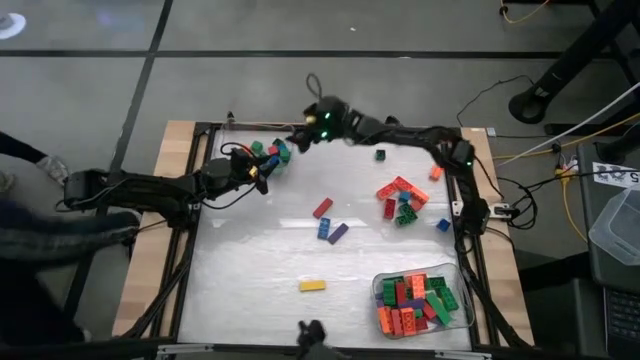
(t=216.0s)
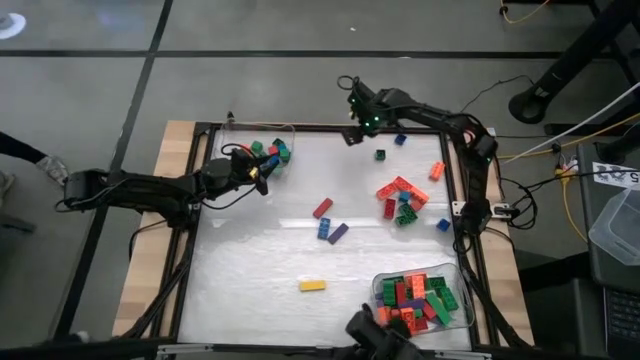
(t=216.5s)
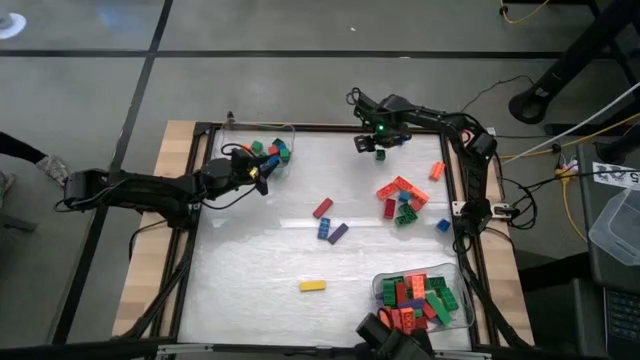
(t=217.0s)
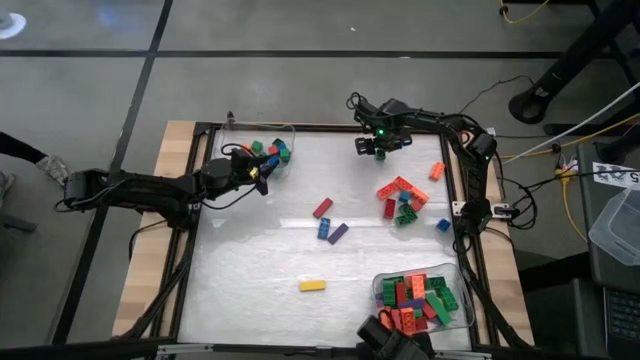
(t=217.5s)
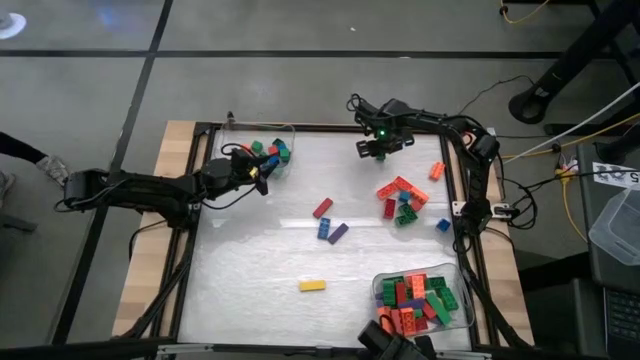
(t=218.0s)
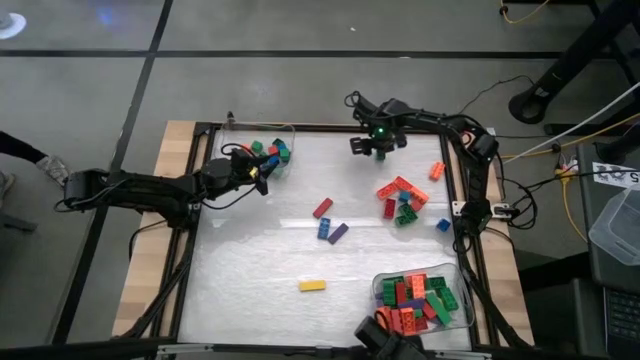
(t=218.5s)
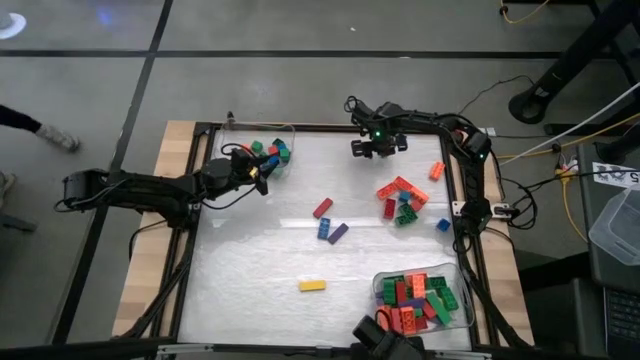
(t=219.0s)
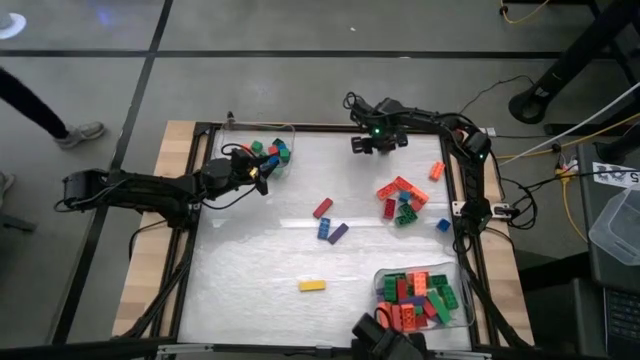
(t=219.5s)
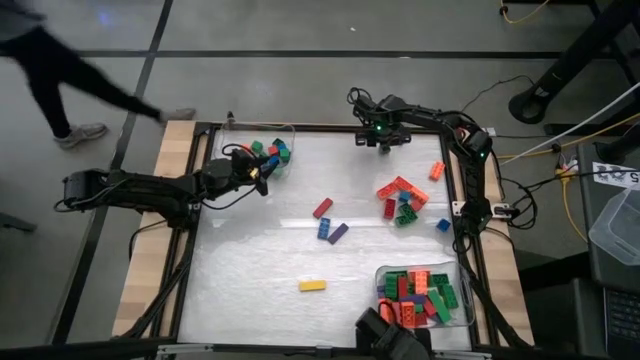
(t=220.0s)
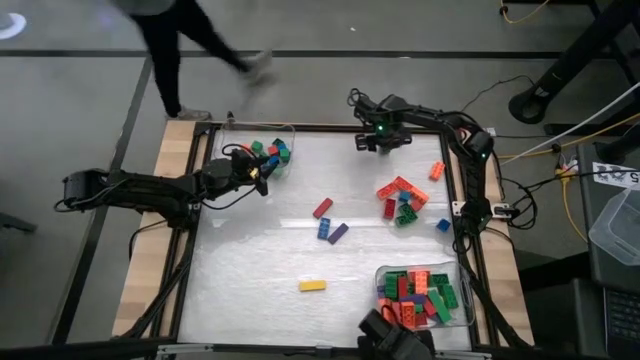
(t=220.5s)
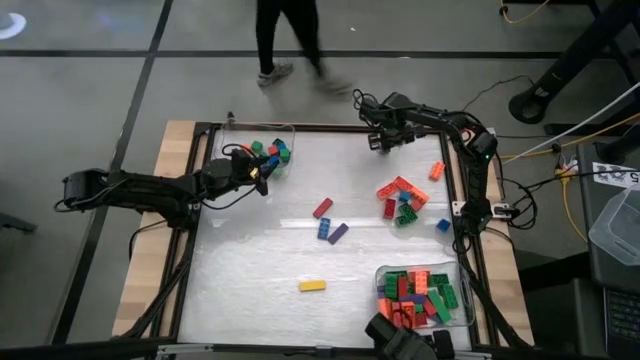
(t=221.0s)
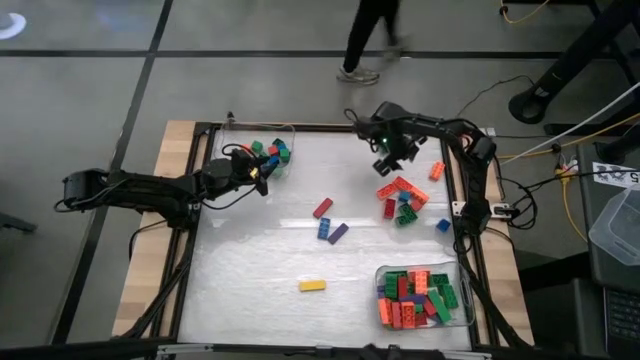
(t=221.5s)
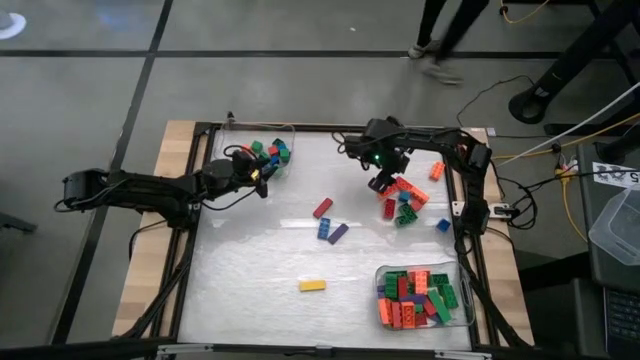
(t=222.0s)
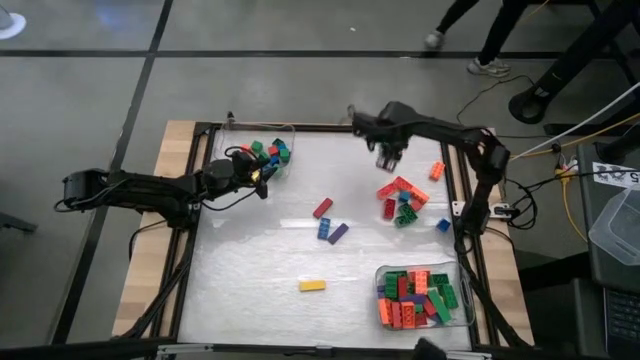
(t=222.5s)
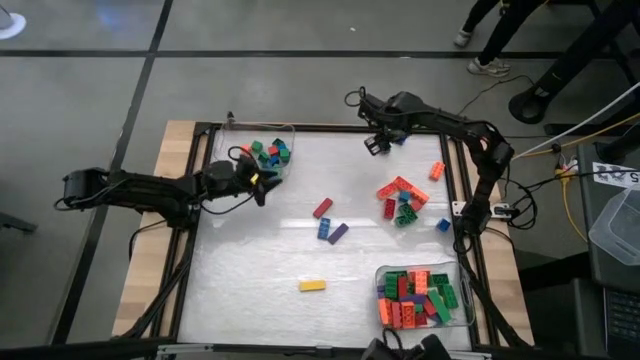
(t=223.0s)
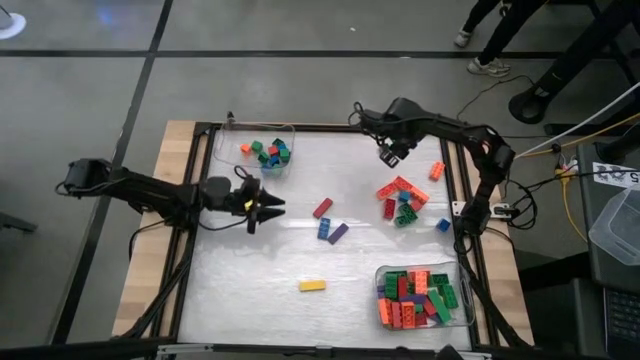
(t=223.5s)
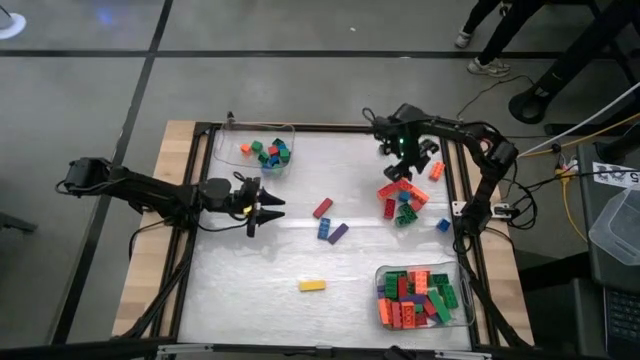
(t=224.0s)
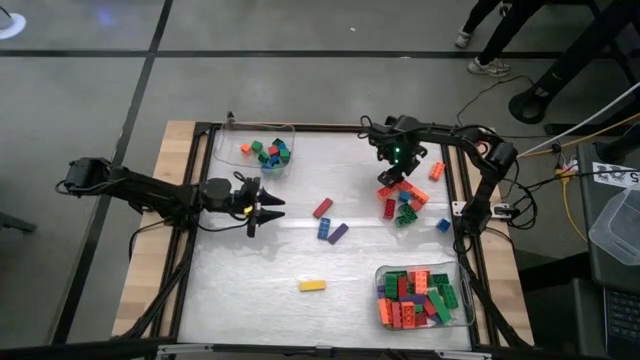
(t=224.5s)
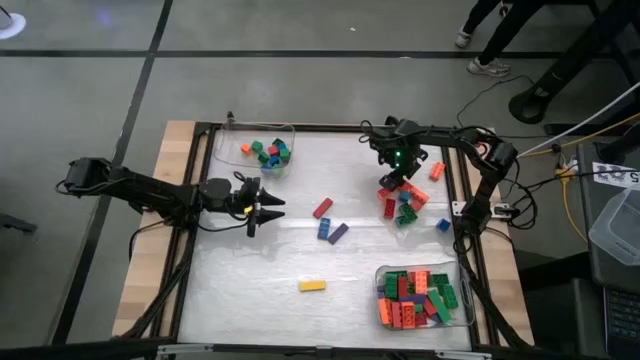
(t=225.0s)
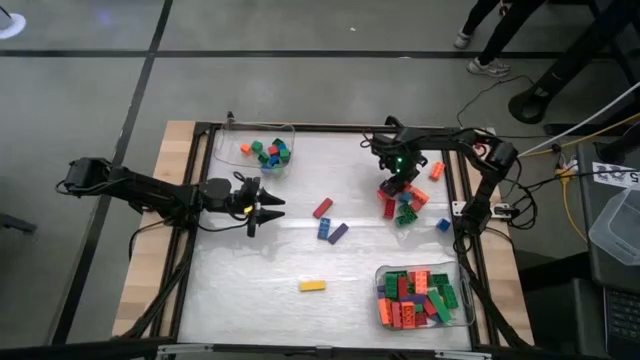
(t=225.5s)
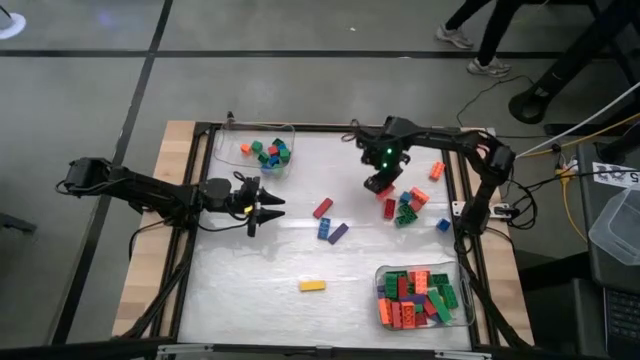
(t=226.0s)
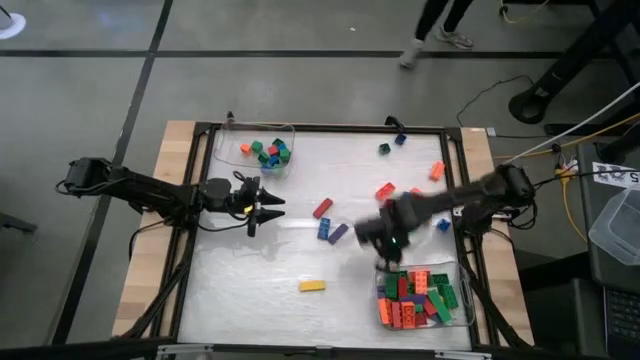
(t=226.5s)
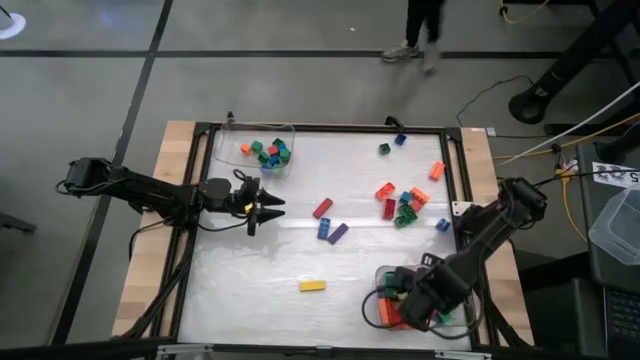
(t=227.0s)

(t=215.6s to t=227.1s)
Task: Sort blocks by size
Put the rectangular orange game piece into the bottom transparent bin

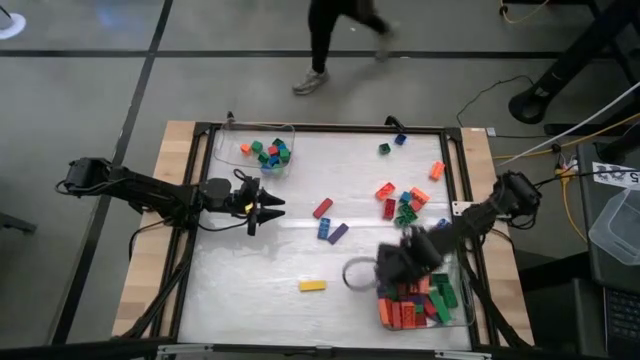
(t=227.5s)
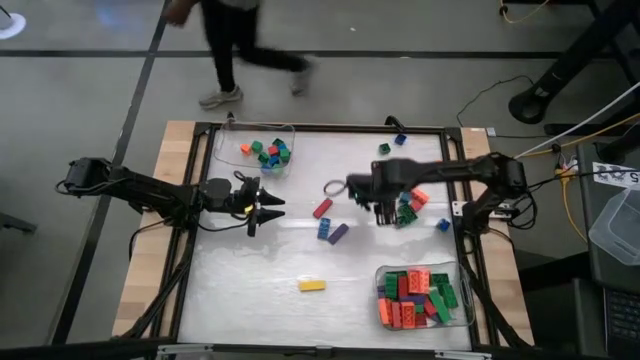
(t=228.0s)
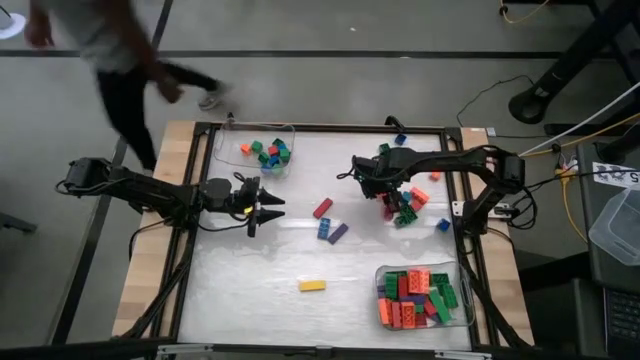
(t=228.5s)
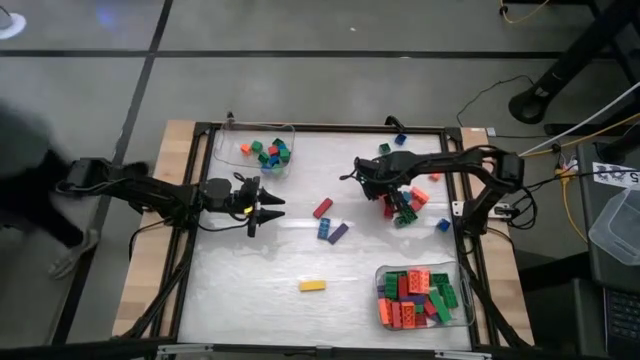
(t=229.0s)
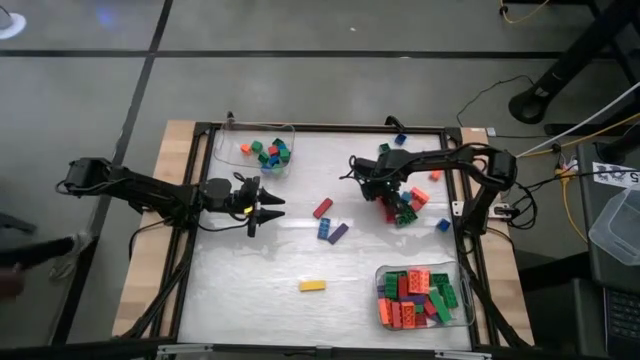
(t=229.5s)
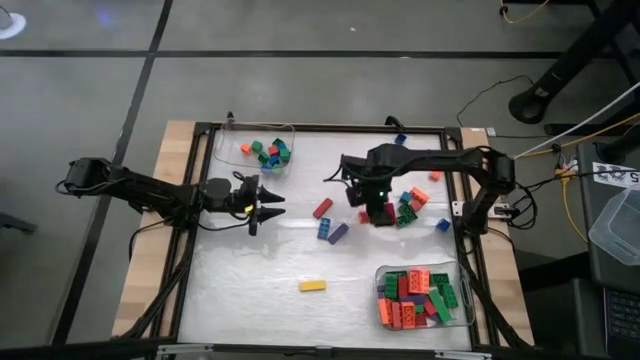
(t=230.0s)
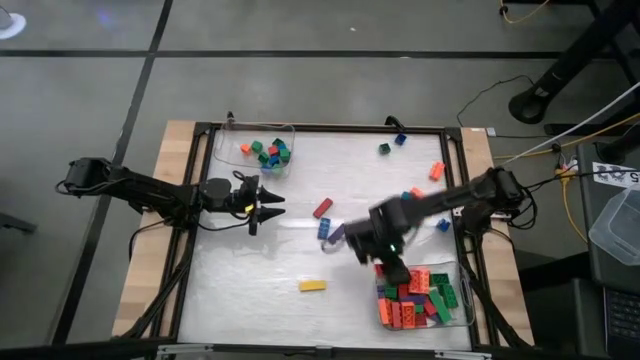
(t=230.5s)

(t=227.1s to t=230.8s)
Put the rectangular orange game piece into the bottom transparent bin

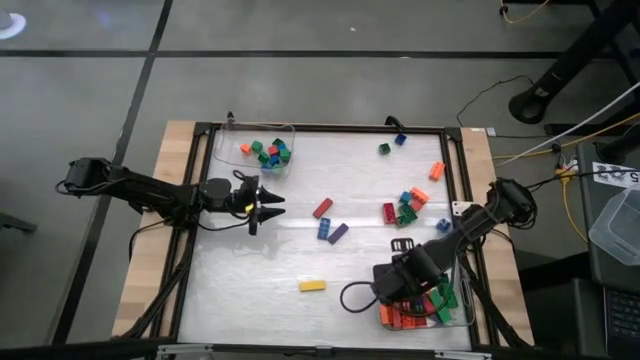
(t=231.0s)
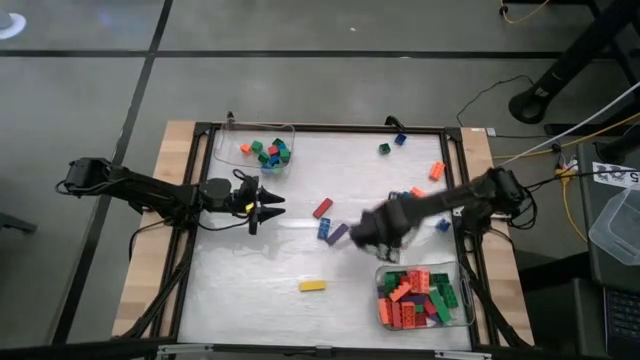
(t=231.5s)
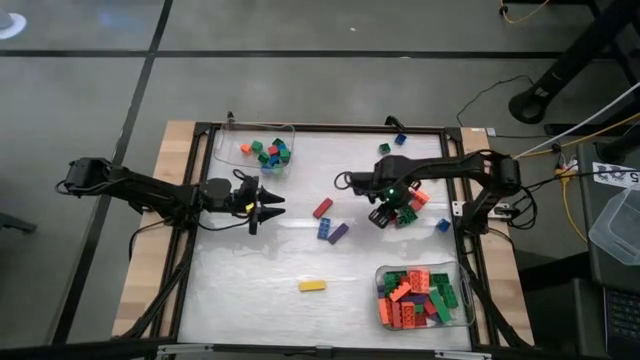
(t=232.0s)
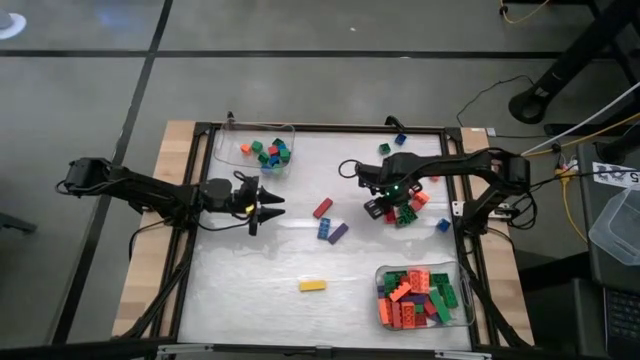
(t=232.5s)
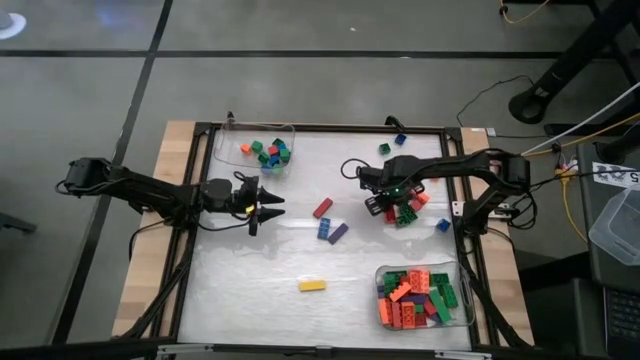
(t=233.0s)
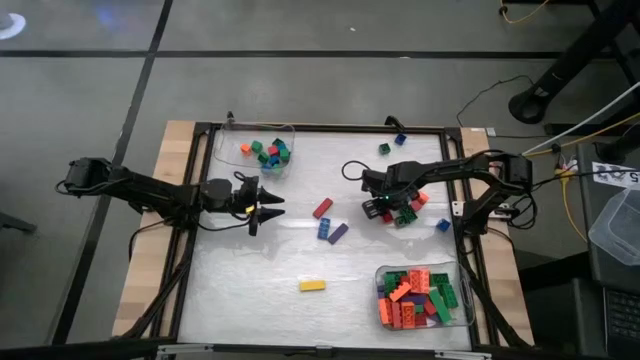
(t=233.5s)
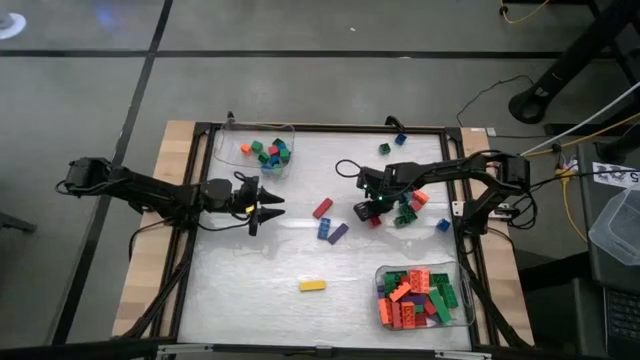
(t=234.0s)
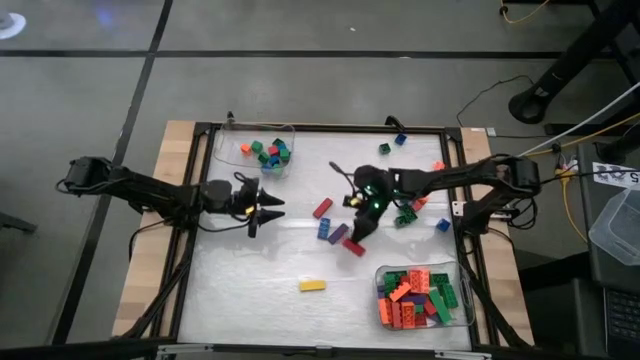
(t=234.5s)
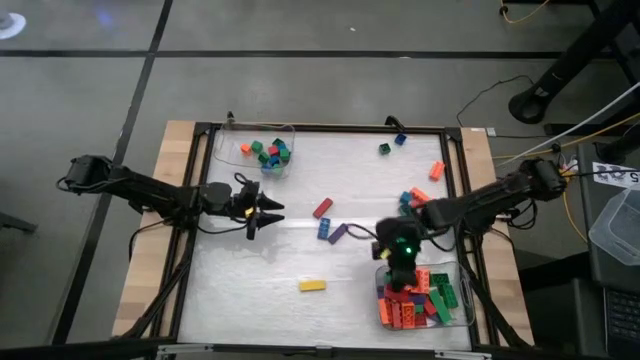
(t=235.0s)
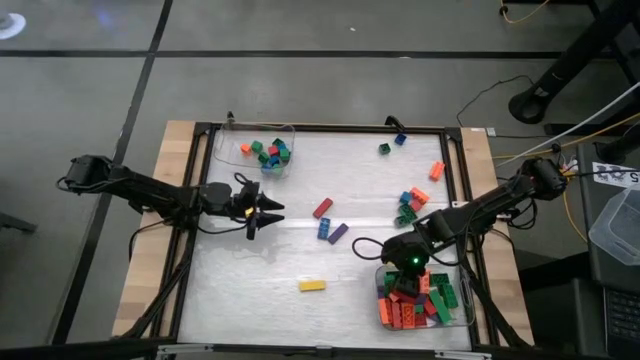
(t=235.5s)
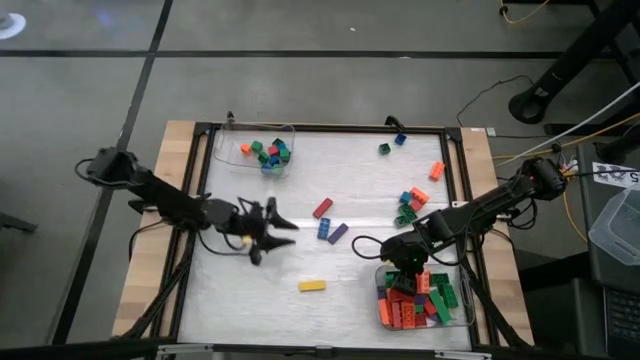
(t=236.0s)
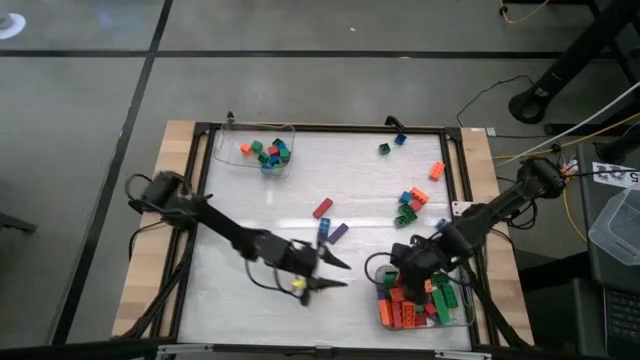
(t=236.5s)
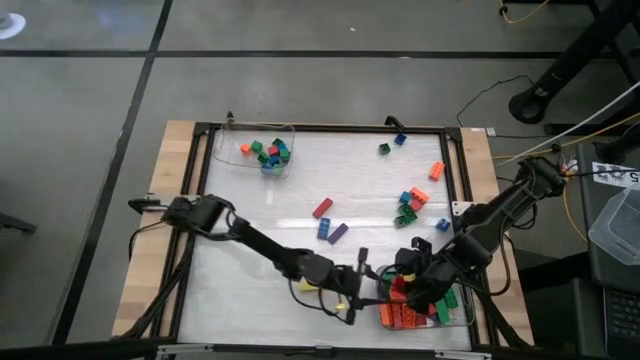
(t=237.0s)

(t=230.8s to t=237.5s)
Put the rectangular red game piece into the bottom transparent bin
